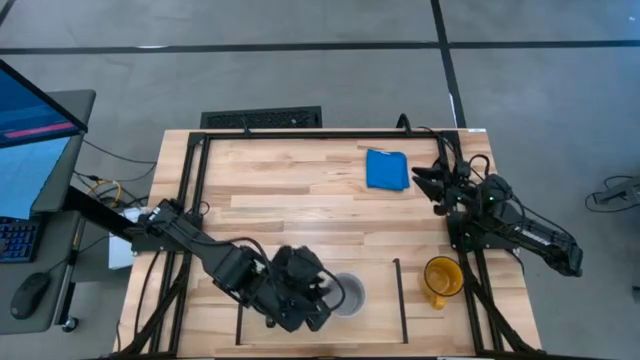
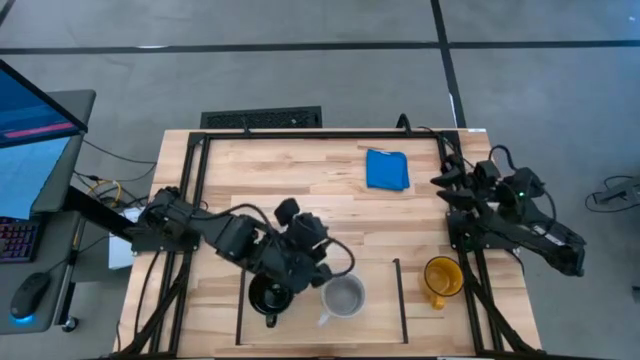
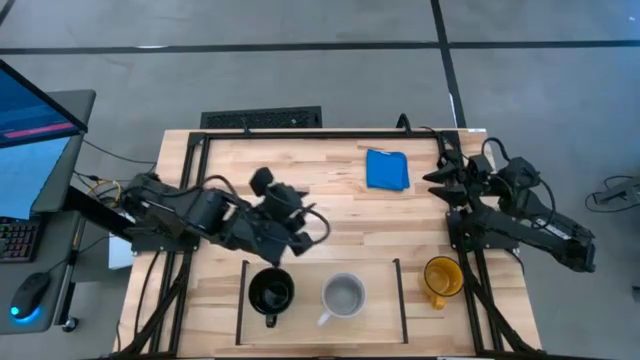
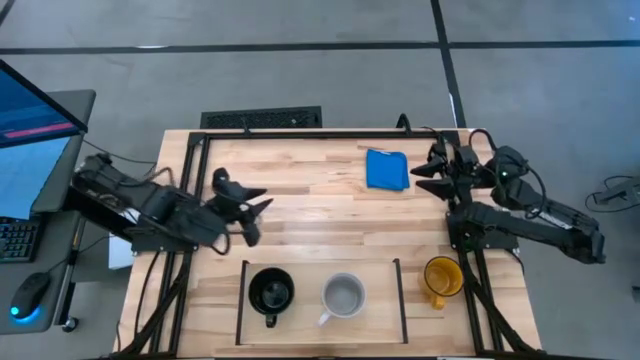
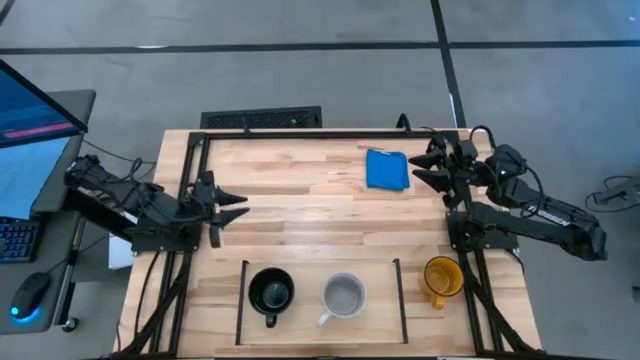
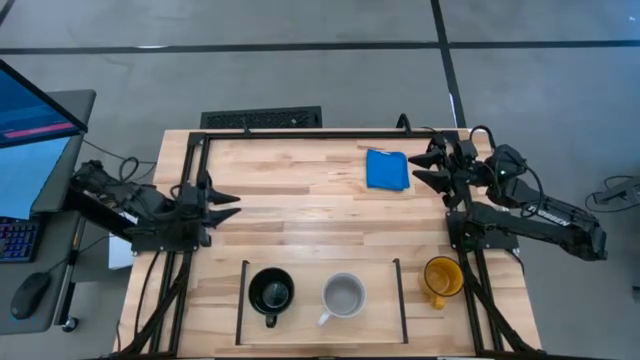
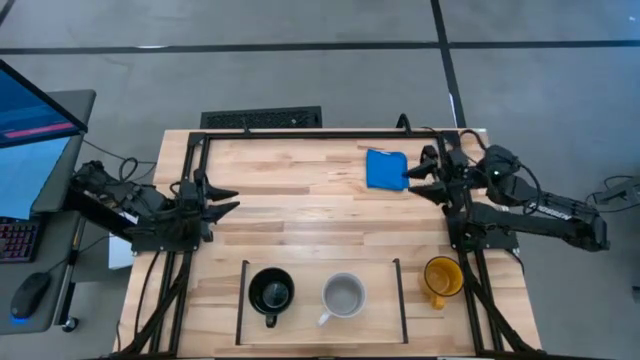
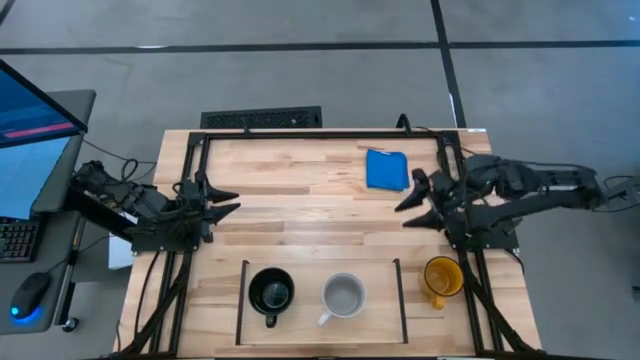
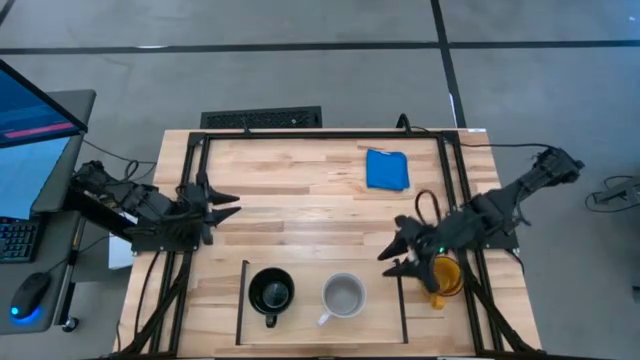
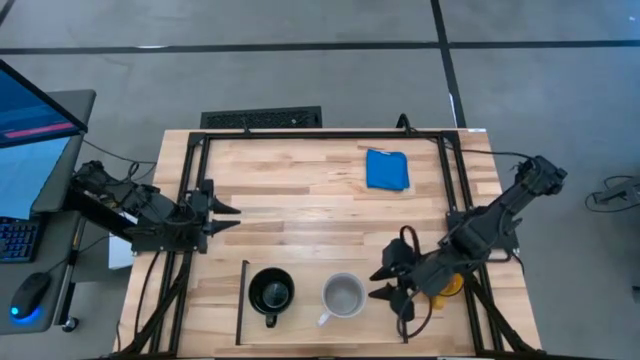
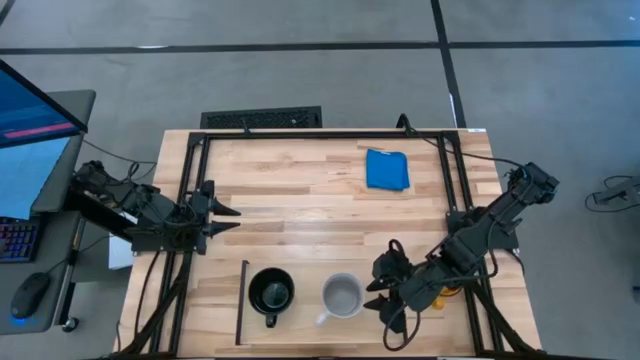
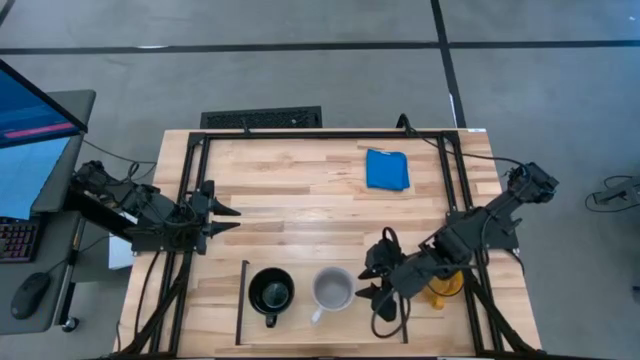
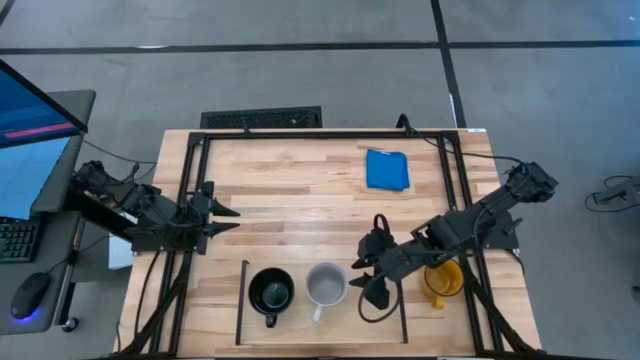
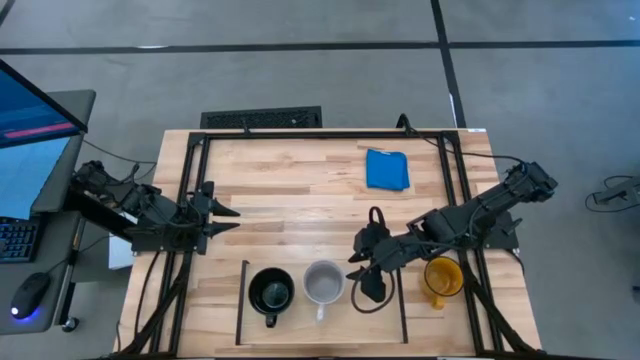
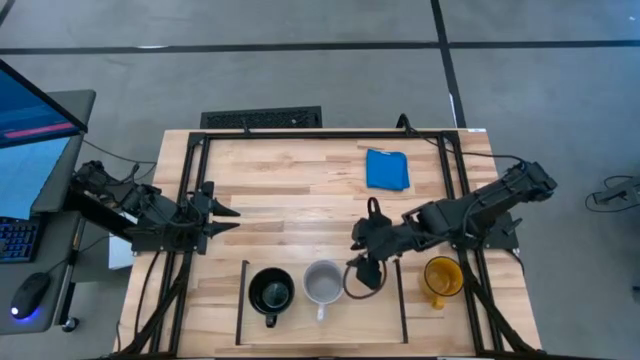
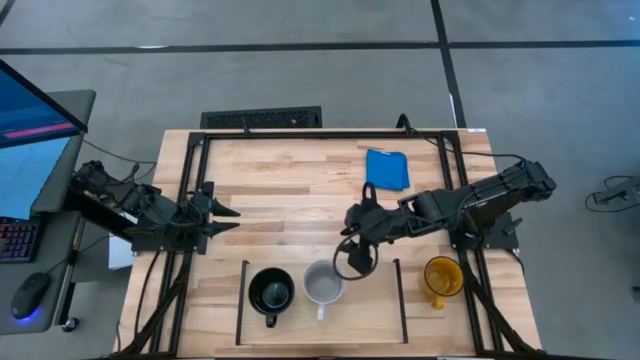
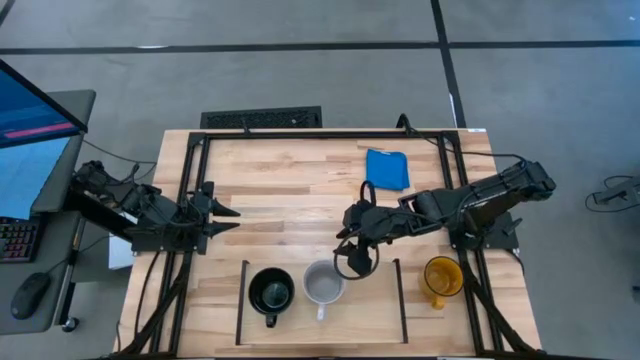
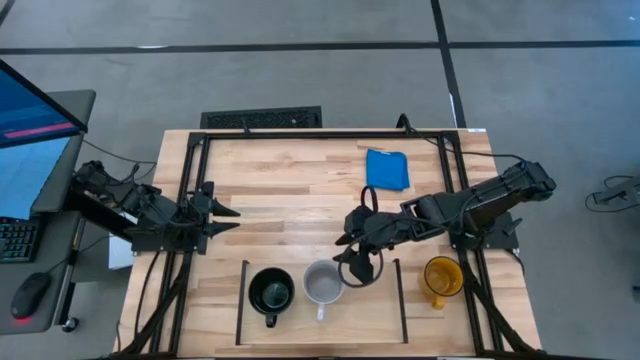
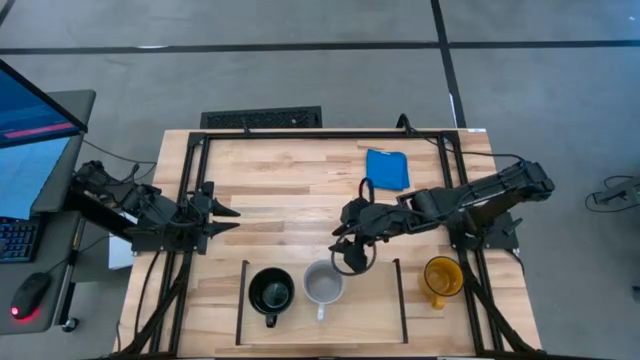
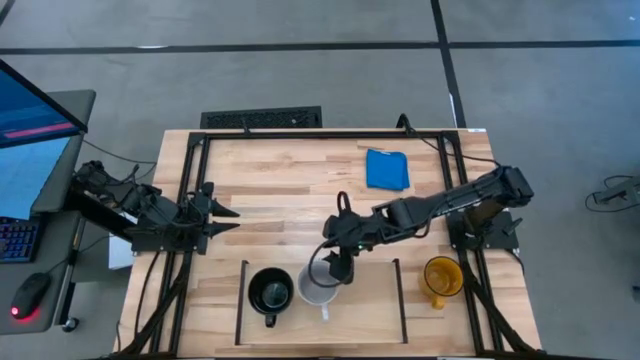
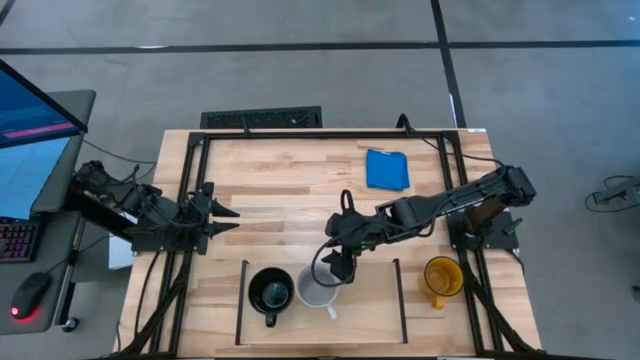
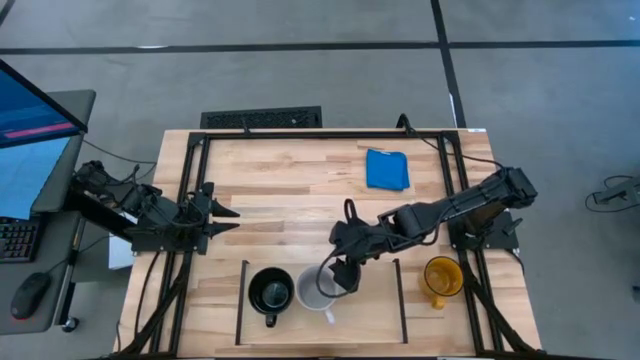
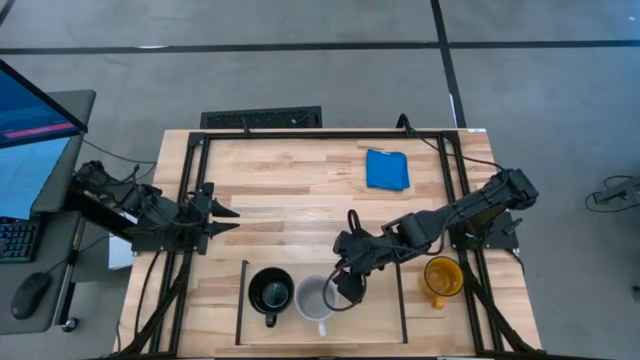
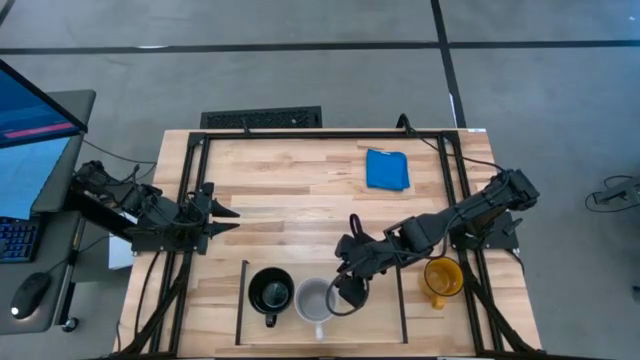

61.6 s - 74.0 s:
Task: Stack small to large cups/mugs on shelf
Adjust the white mug

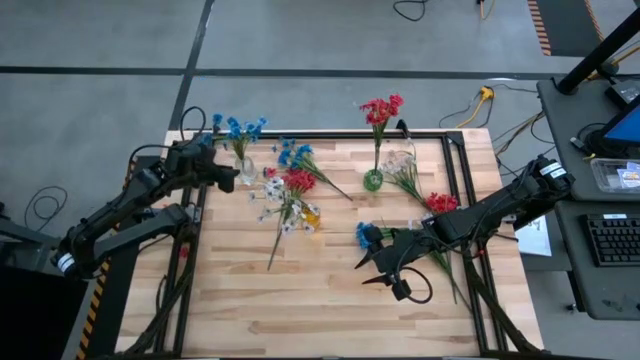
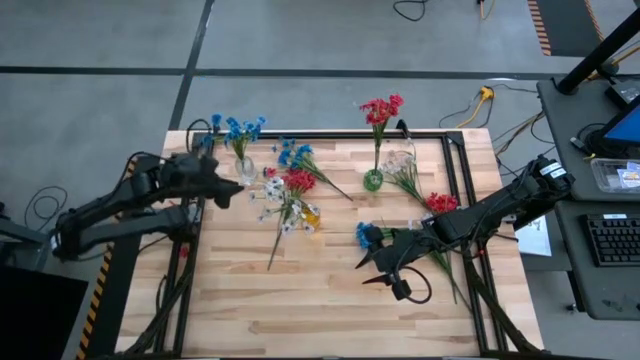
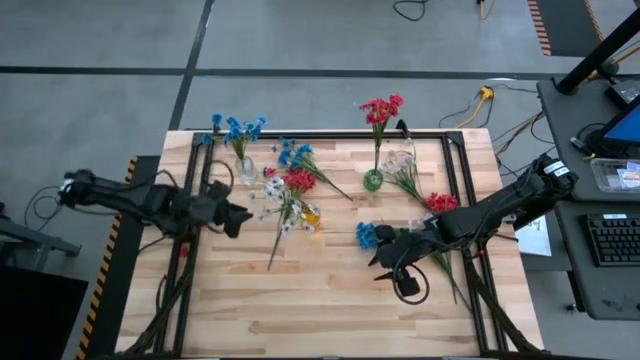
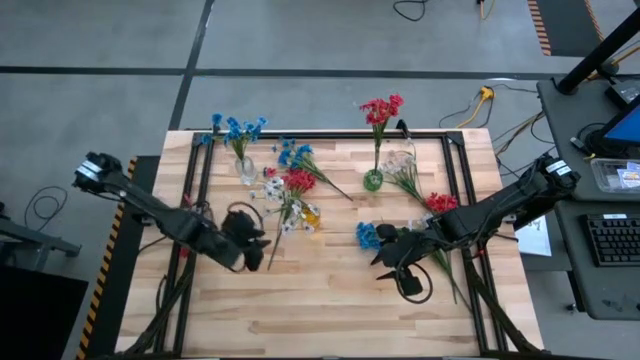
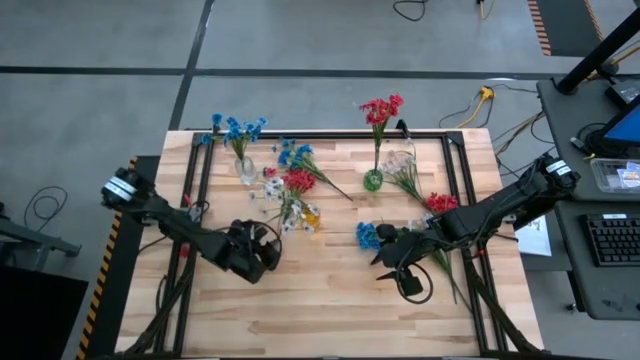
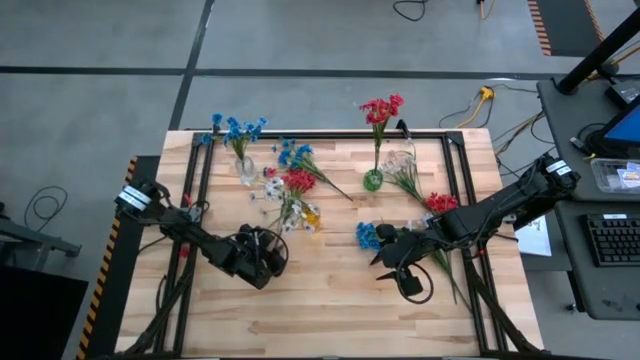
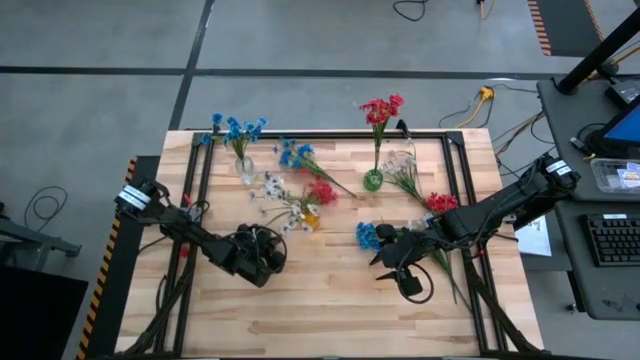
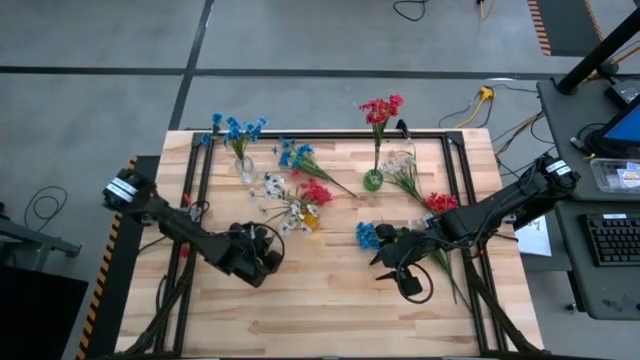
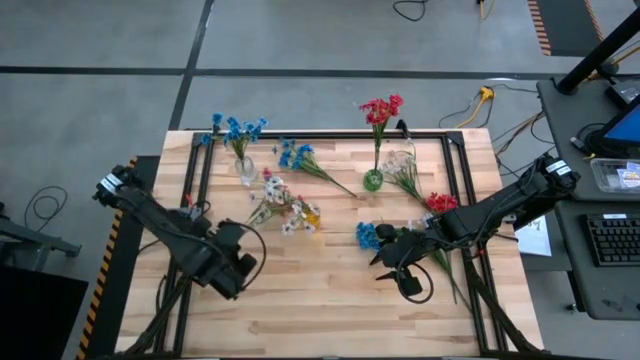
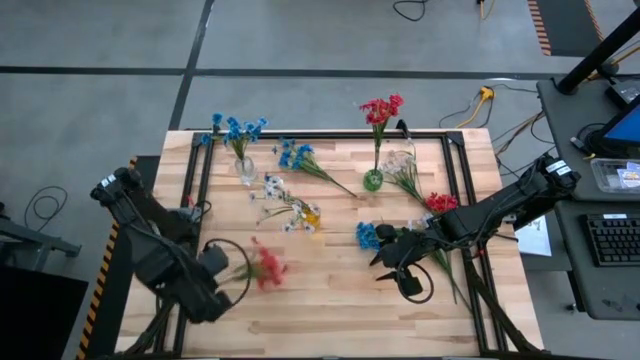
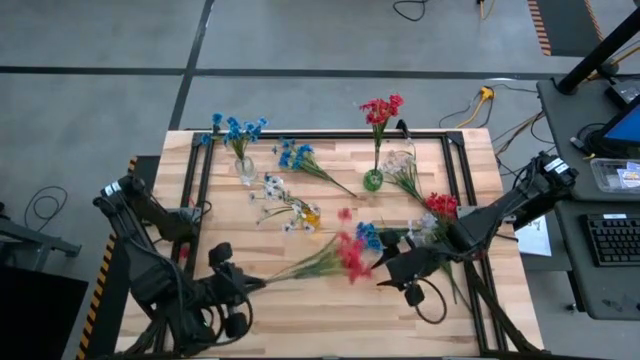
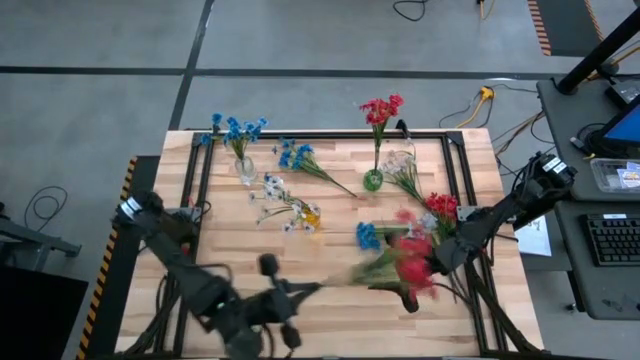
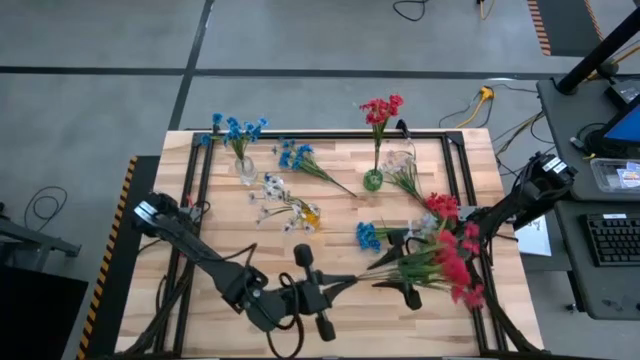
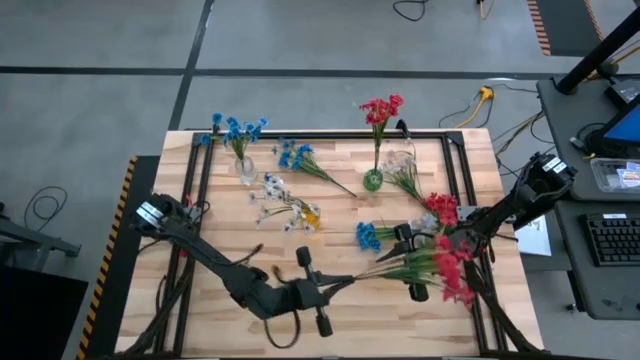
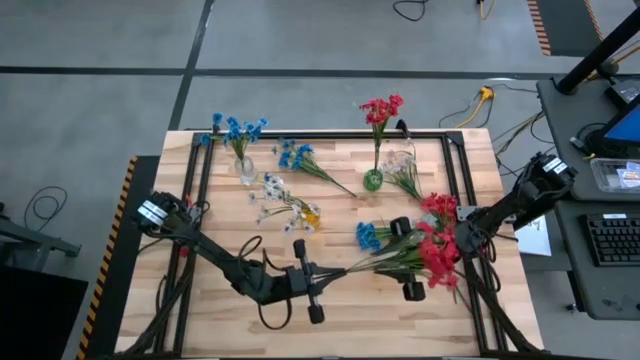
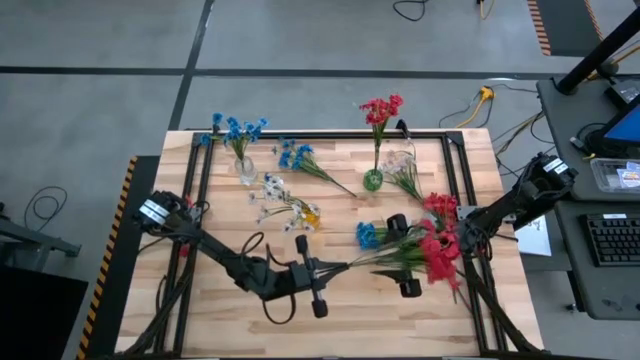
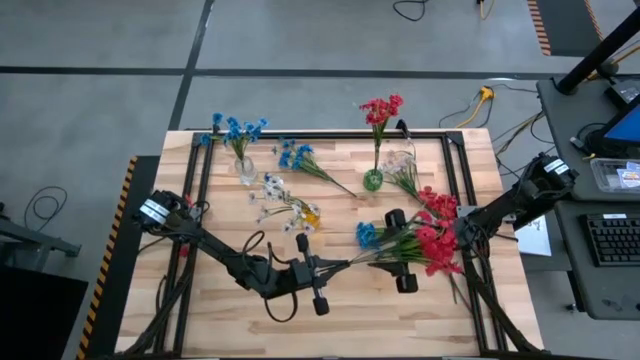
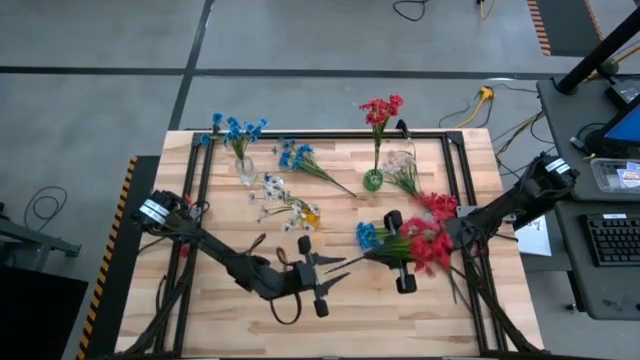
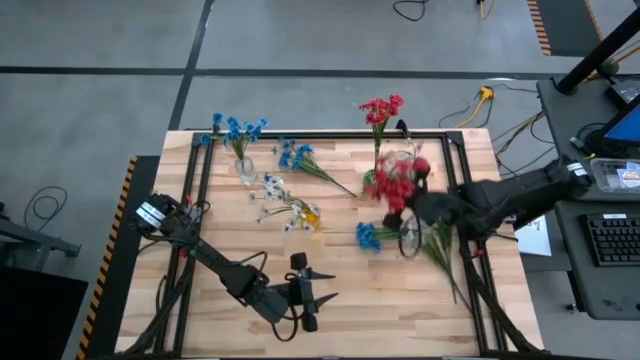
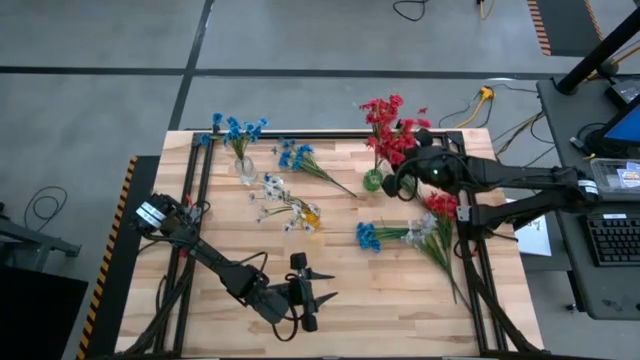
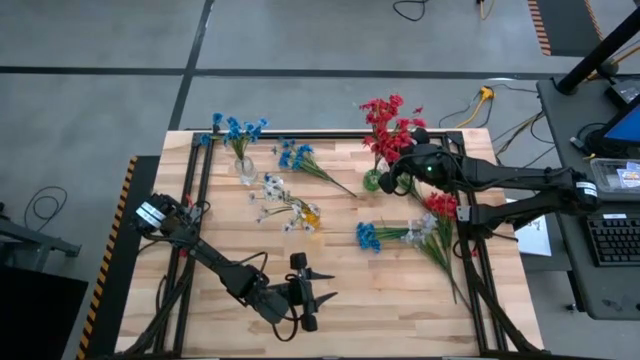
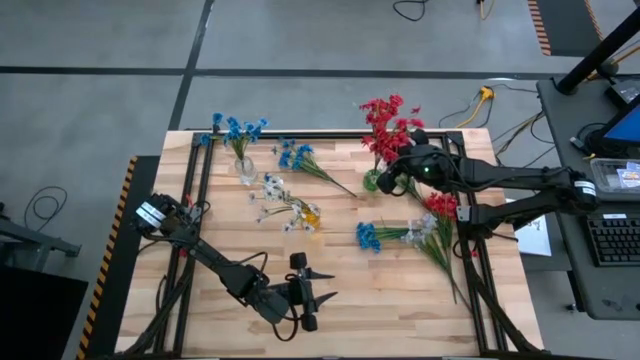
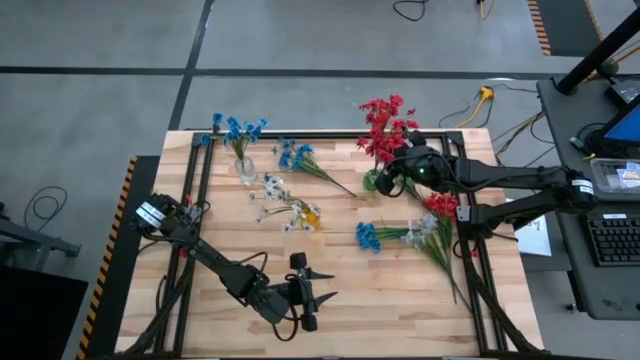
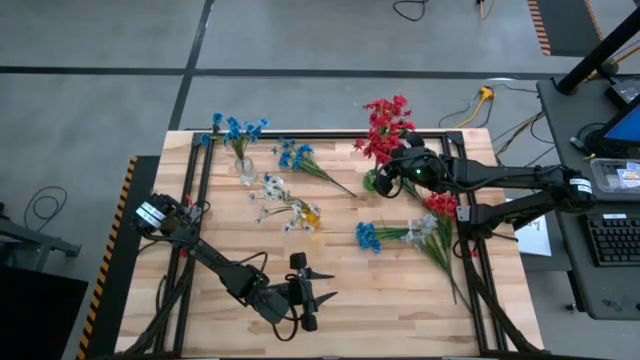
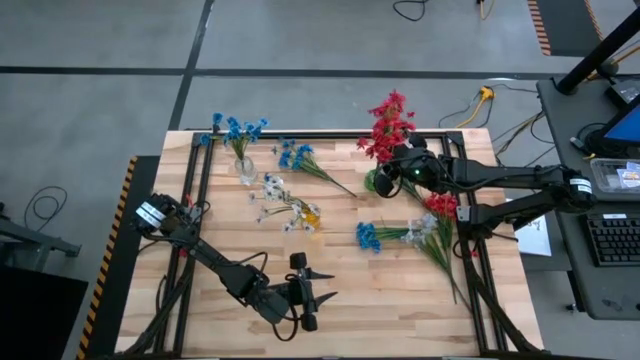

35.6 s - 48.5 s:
Task: Sort flowers into vase by color
Put the left red flowers into the green vase
